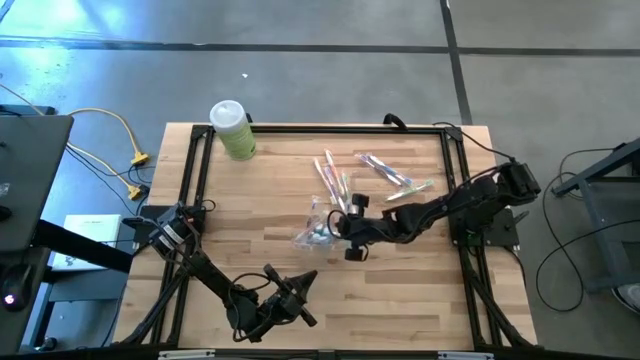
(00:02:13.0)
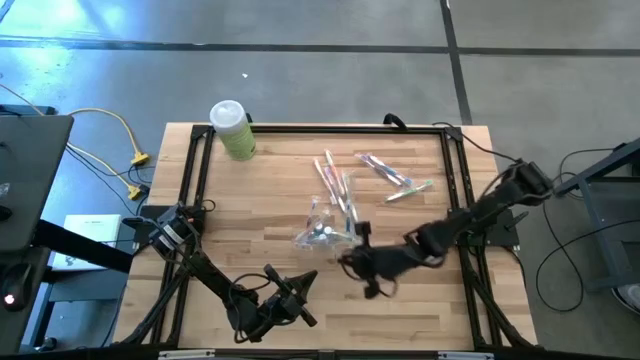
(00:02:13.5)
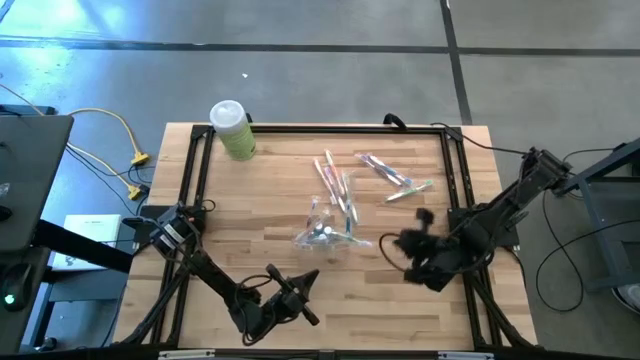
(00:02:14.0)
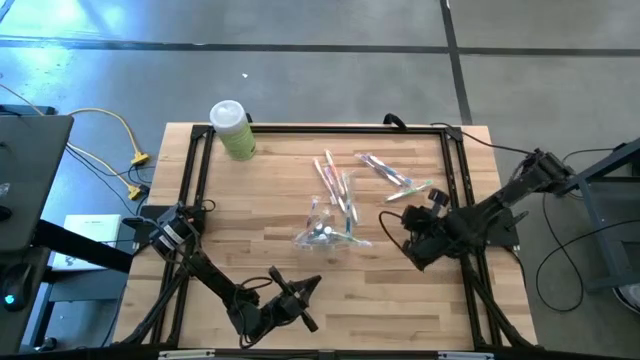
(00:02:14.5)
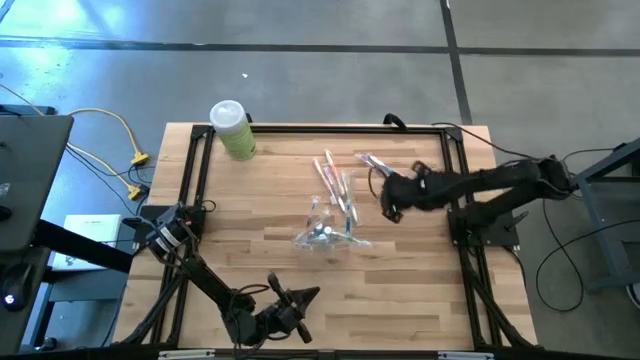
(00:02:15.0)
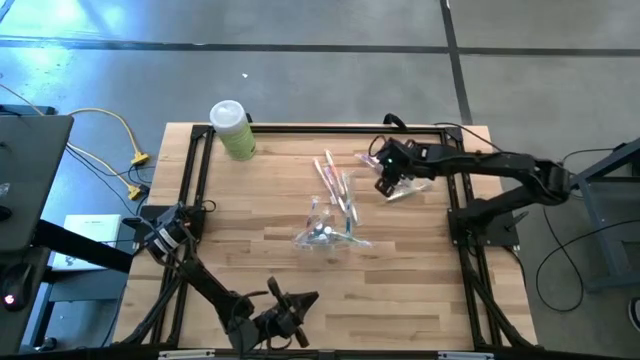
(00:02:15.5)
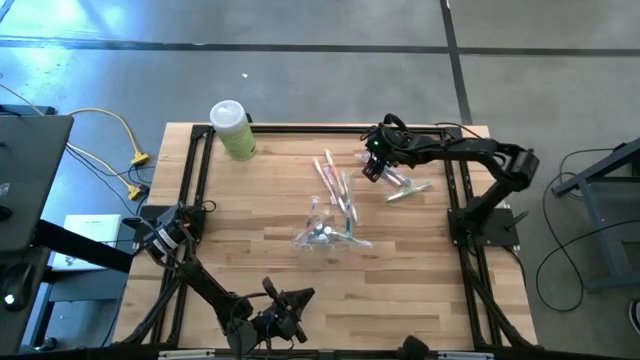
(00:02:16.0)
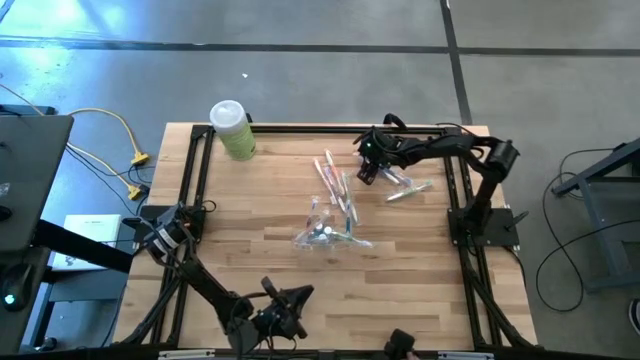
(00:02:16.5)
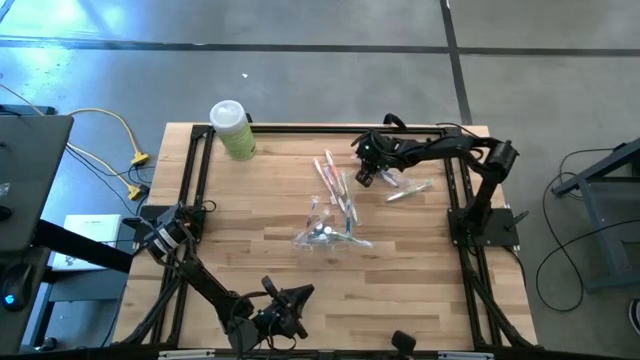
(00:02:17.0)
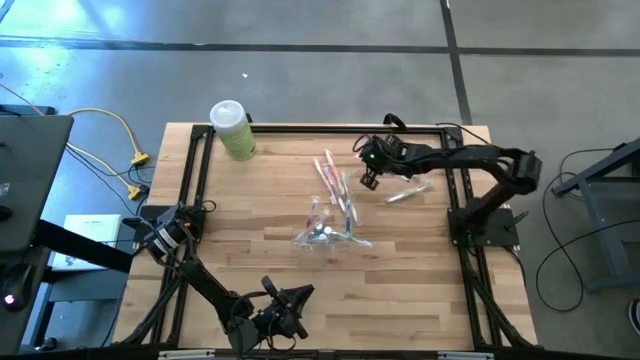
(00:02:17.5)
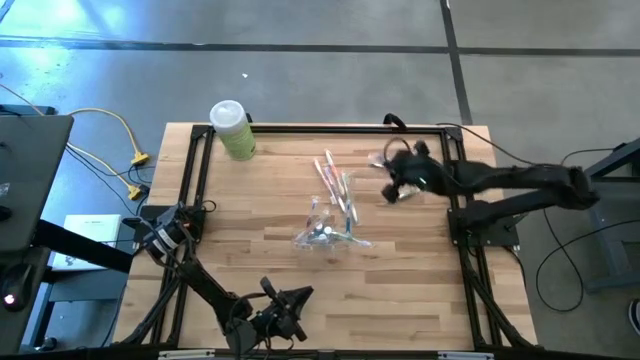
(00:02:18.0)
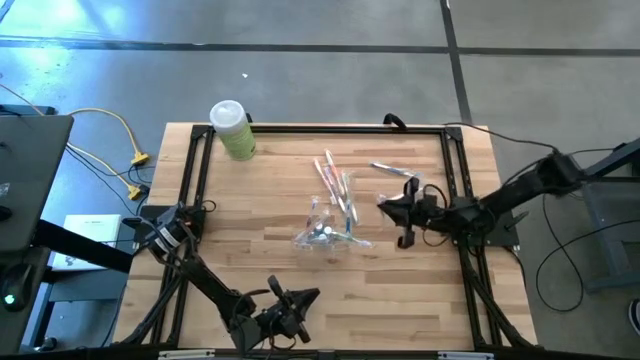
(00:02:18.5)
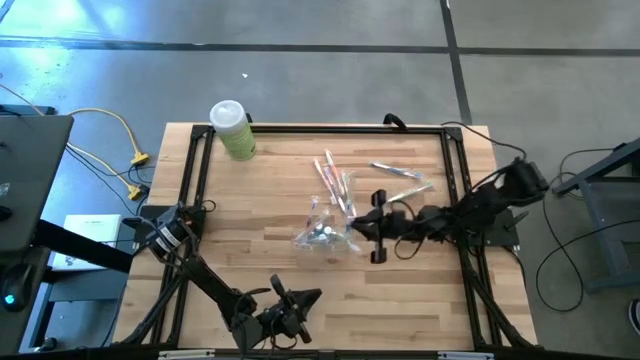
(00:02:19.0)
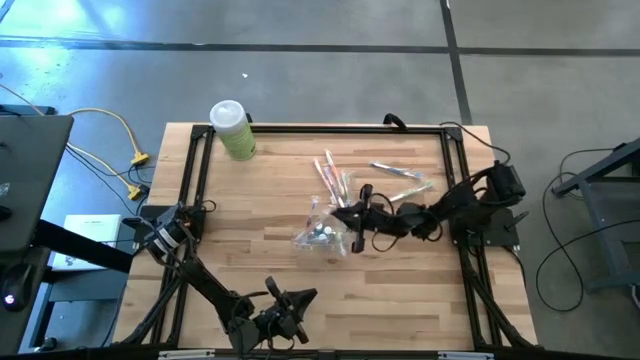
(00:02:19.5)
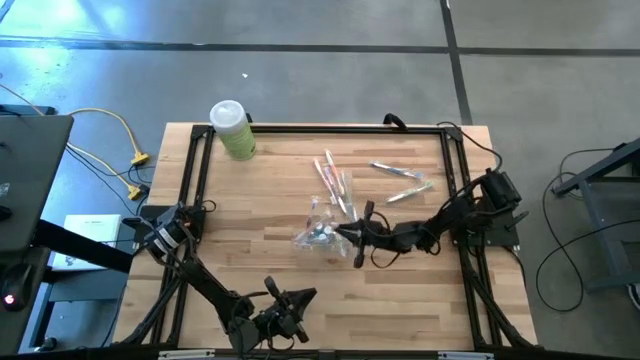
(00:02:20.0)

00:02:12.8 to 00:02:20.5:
Task: Pick & Place toothbrushing station
Put the violet toothbrush into the transparent organizer

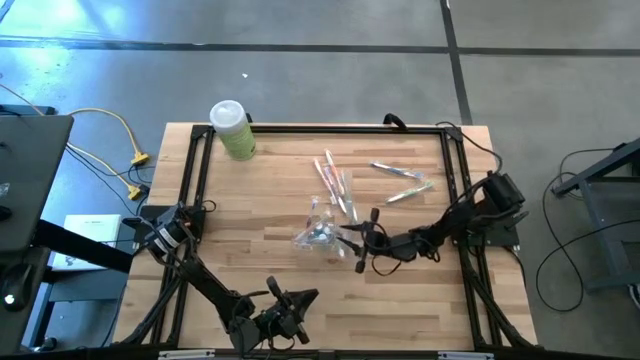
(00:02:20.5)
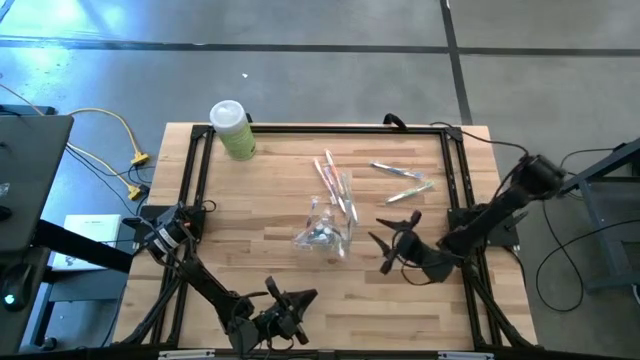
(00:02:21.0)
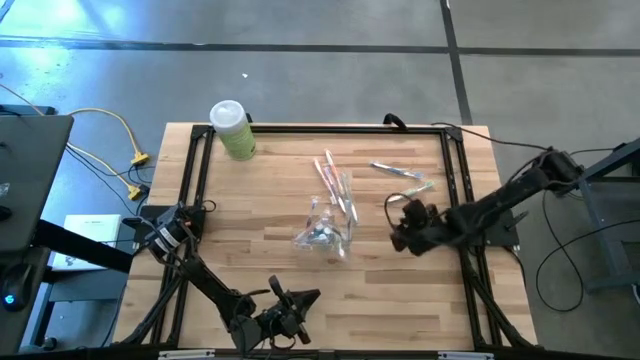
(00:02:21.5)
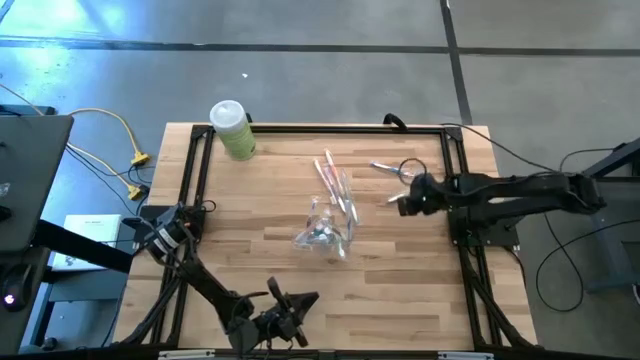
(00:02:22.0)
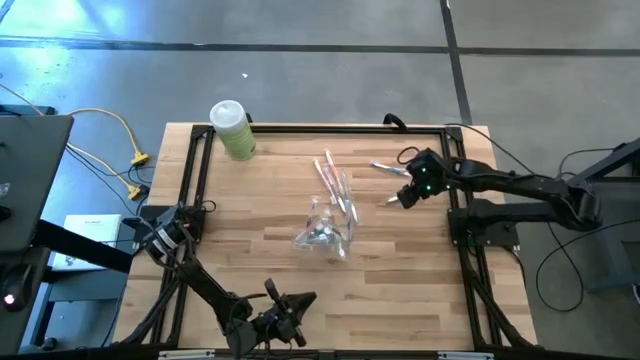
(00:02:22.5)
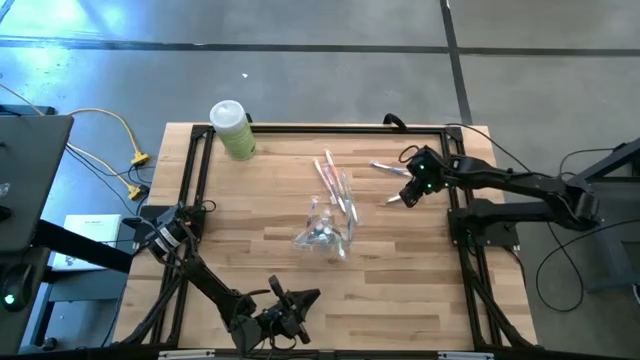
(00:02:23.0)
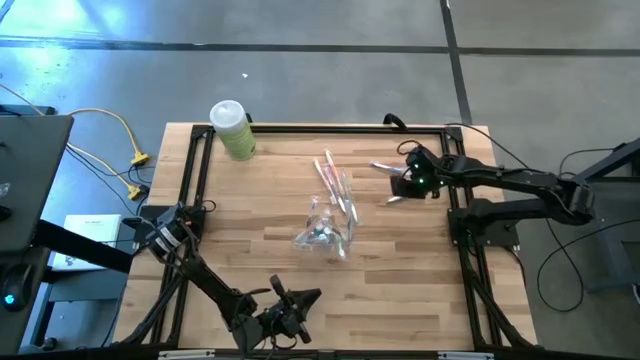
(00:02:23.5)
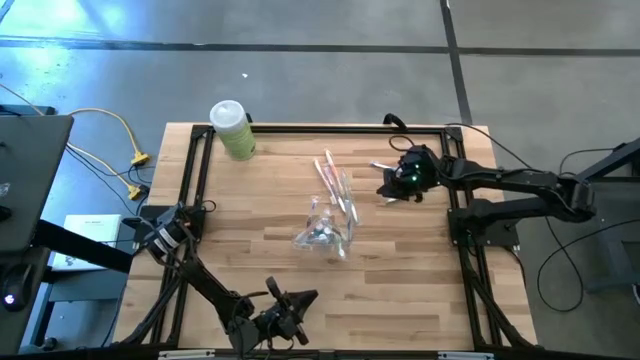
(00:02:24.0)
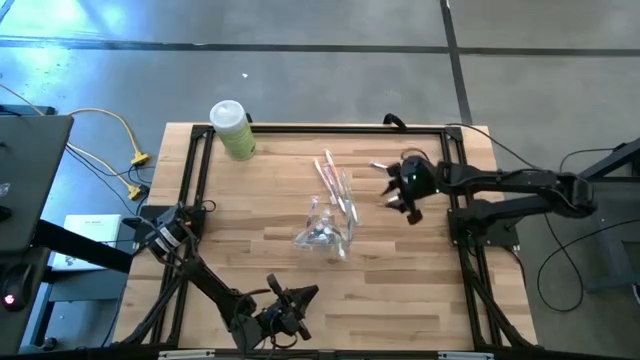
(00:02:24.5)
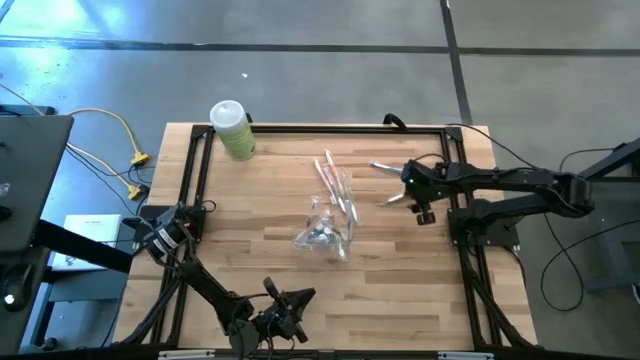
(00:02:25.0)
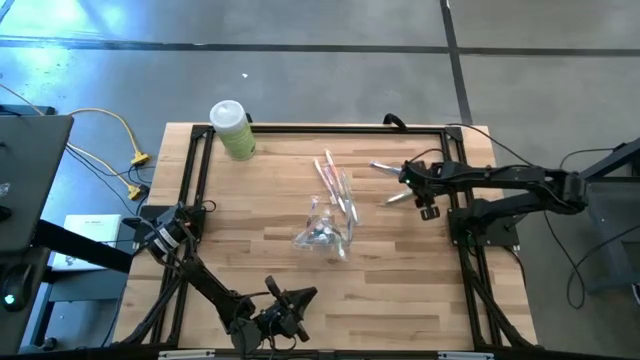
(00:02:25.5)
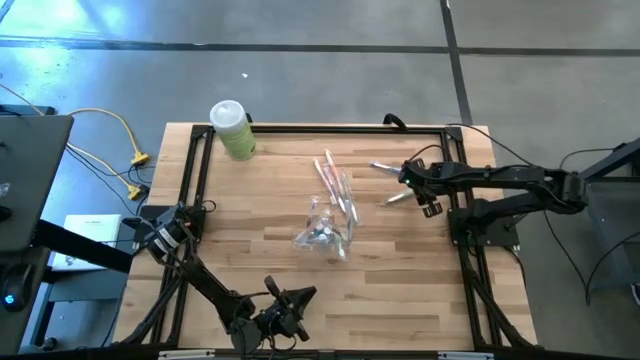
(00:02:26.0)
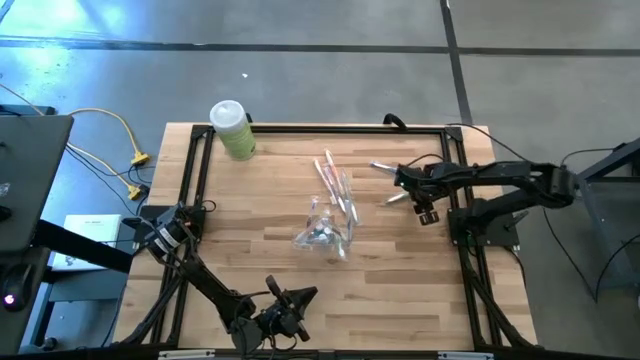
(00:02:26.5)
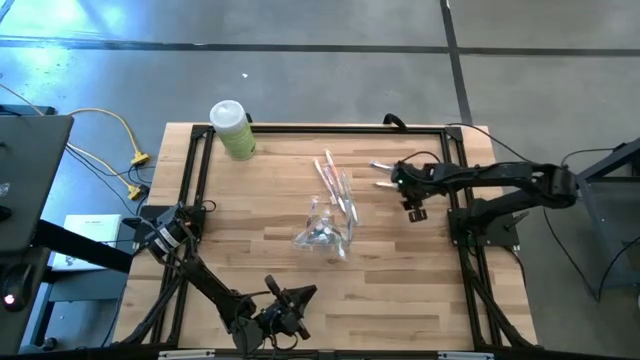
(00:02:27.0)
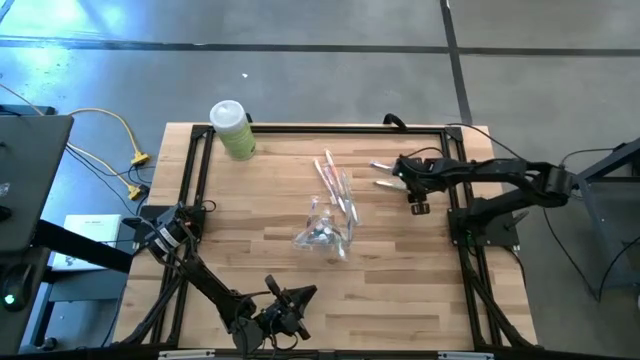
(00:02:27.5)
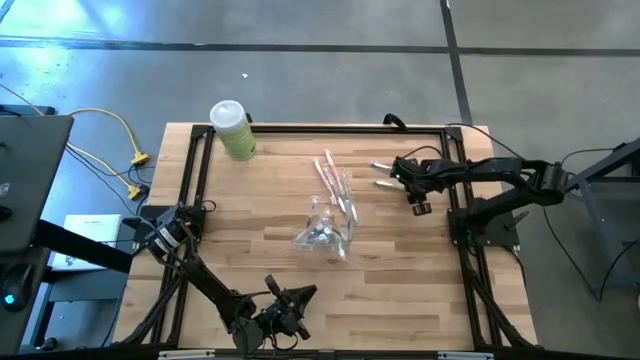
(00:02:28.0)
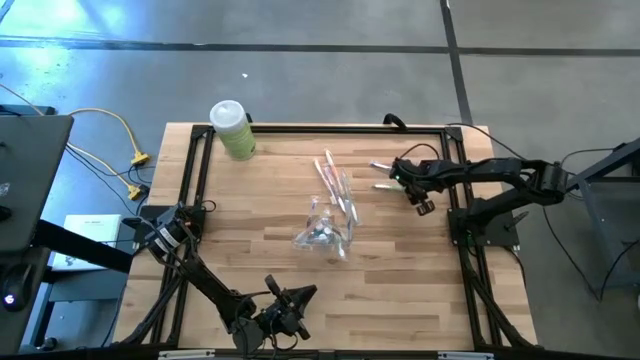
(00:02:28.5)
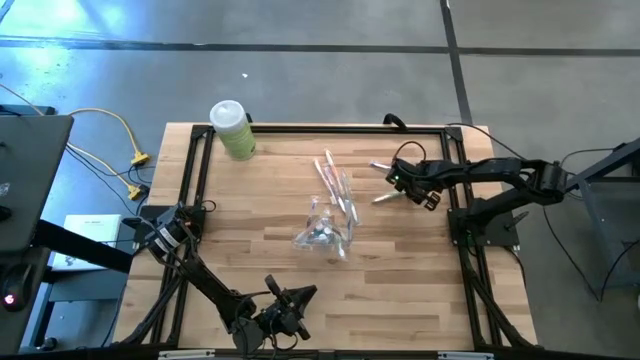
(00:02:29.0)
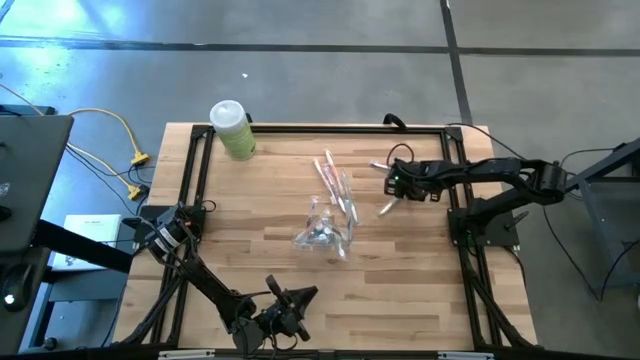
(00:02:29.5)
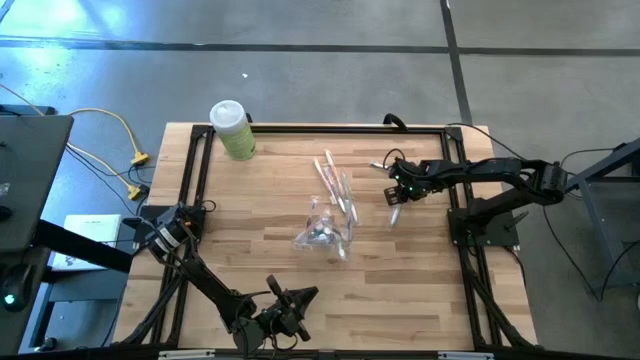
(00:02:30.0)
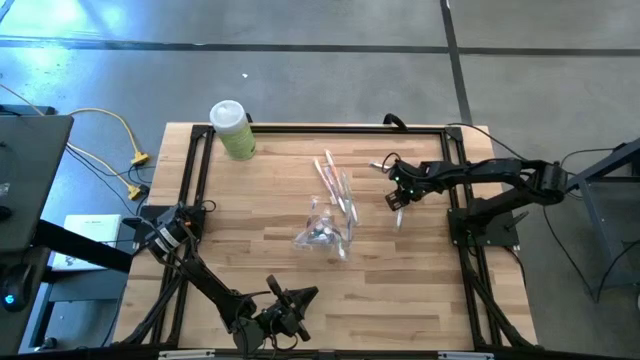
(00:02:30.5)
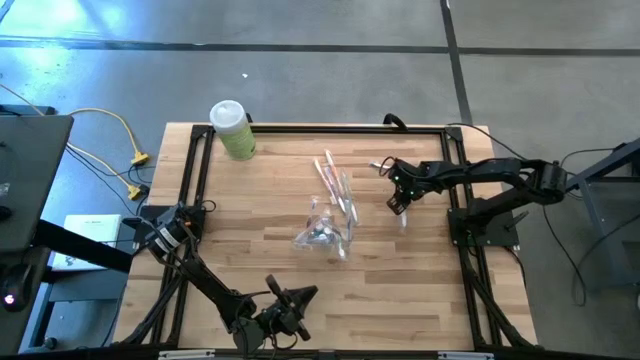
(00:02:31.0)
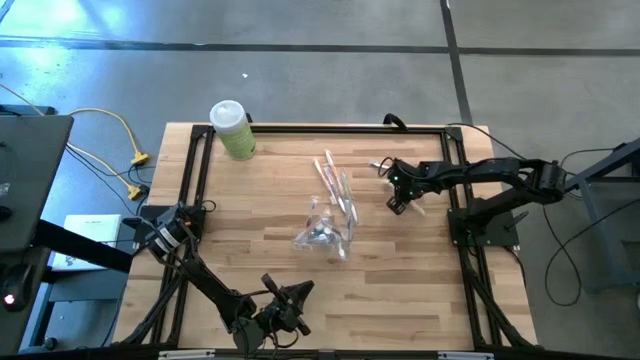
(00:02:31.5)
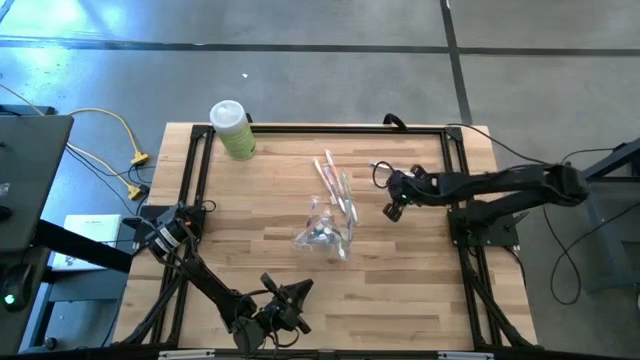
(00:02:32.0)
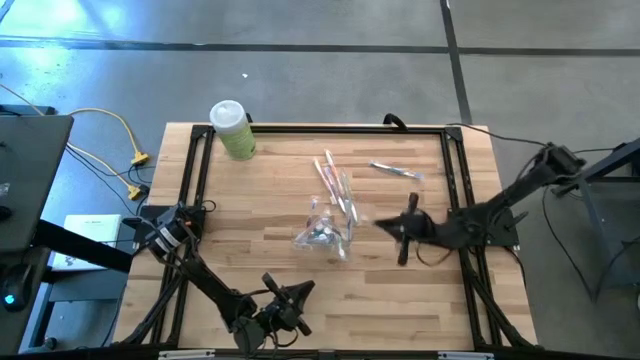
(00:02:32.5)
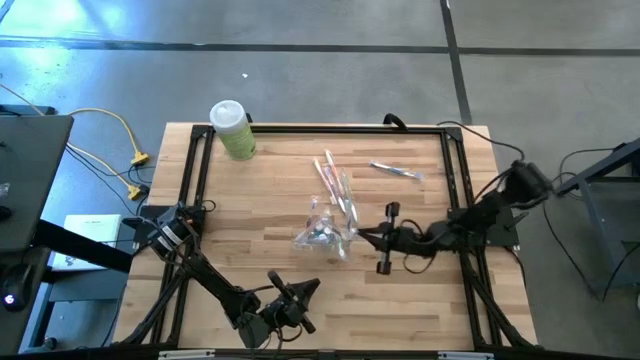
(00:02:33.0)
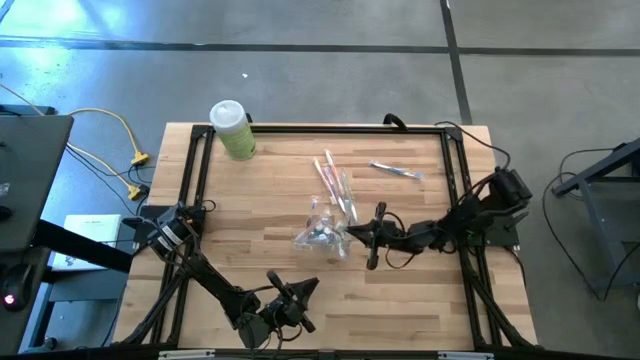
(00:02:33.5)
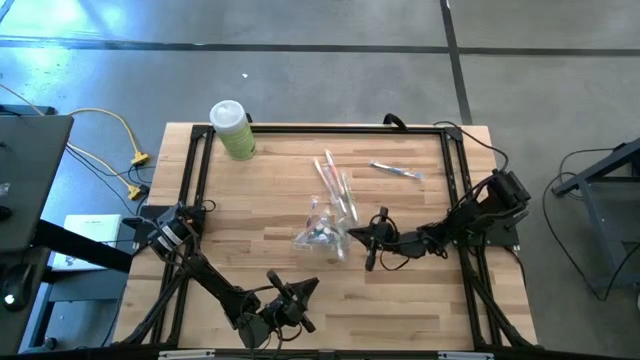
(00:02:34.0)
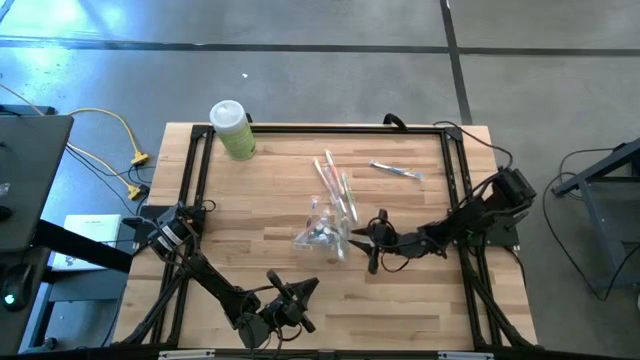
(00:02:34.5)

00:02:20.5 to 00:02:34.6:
Put the green toothbrush into the transparent organizer
